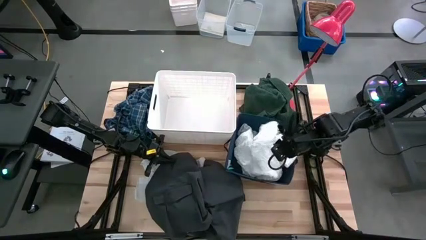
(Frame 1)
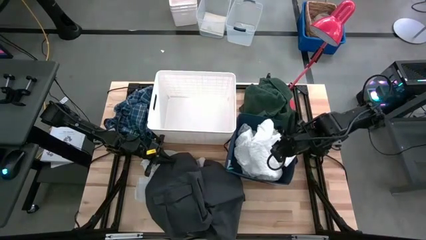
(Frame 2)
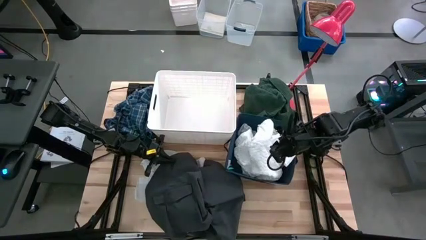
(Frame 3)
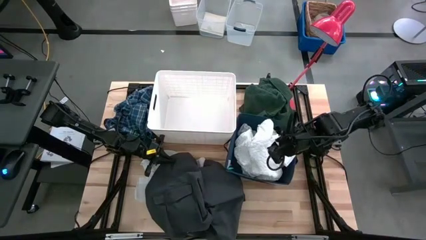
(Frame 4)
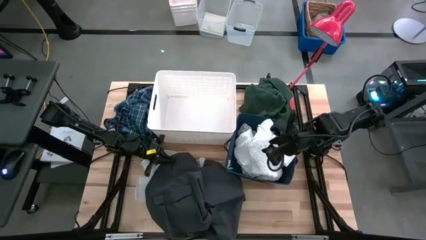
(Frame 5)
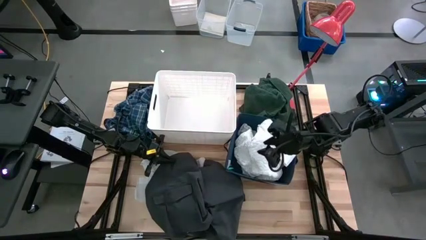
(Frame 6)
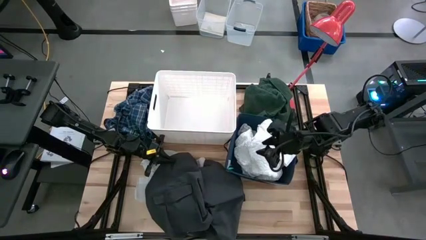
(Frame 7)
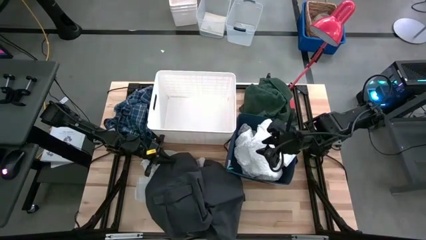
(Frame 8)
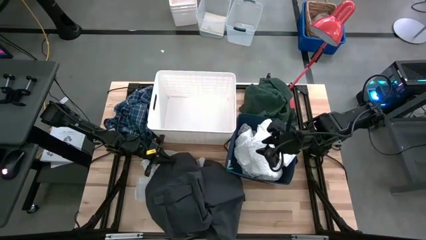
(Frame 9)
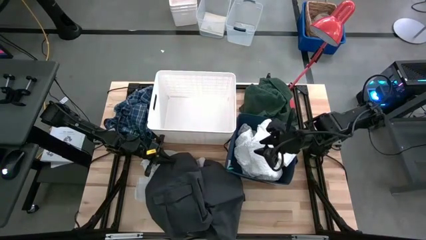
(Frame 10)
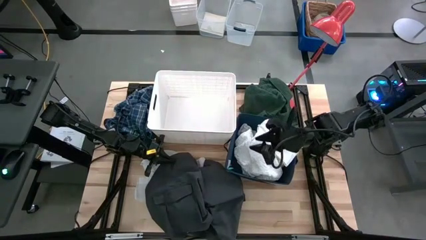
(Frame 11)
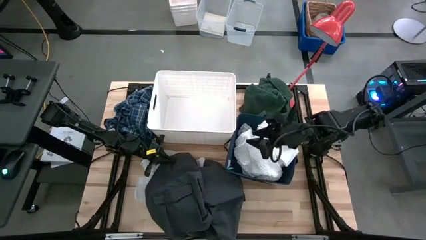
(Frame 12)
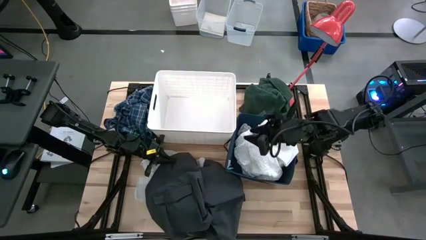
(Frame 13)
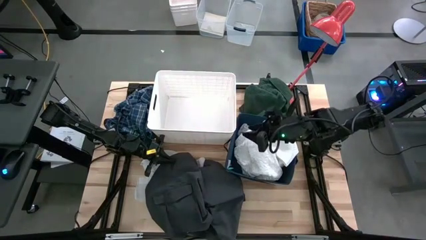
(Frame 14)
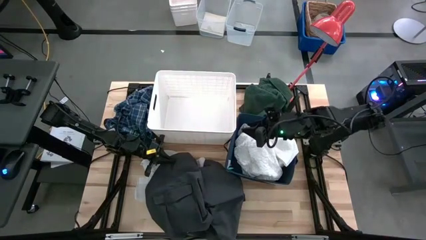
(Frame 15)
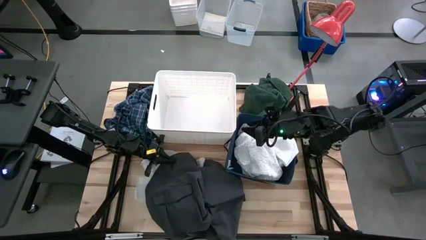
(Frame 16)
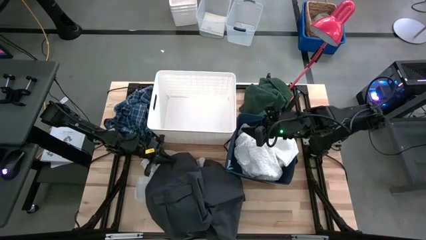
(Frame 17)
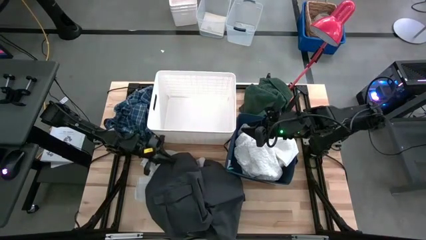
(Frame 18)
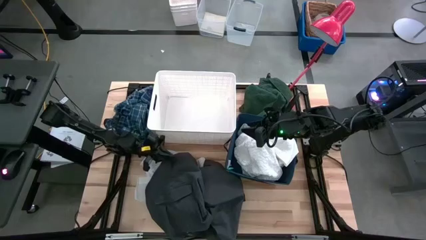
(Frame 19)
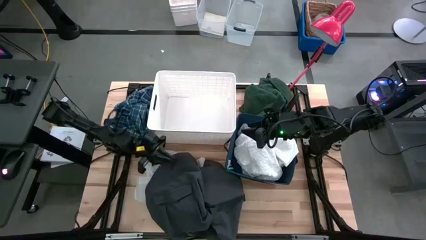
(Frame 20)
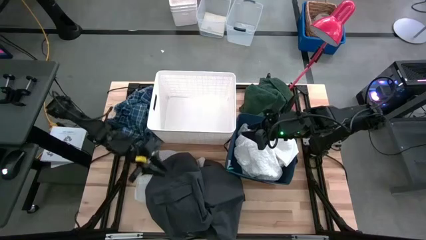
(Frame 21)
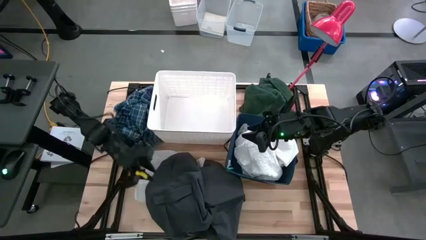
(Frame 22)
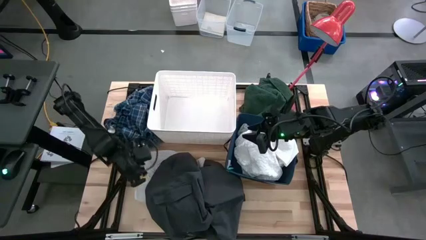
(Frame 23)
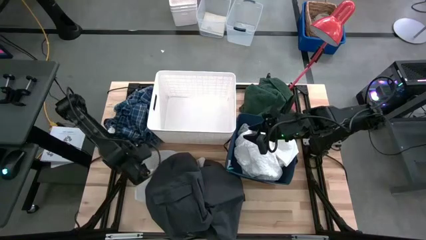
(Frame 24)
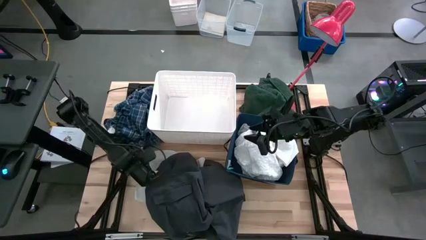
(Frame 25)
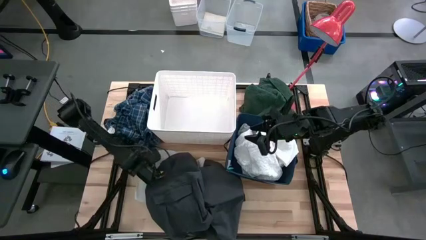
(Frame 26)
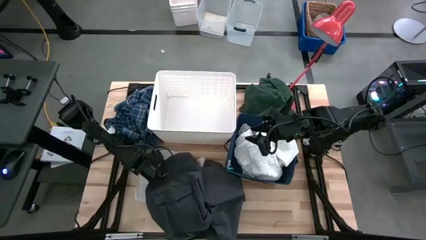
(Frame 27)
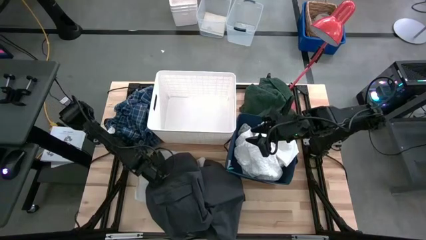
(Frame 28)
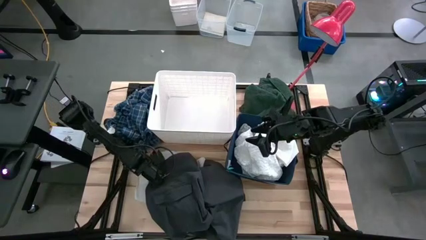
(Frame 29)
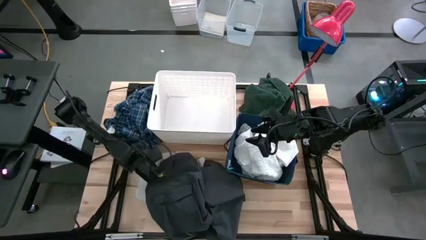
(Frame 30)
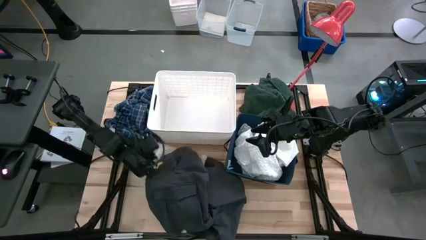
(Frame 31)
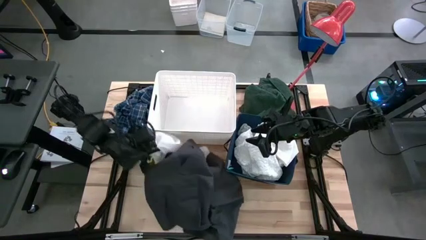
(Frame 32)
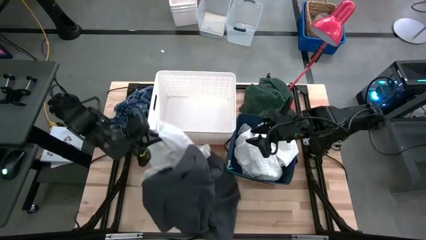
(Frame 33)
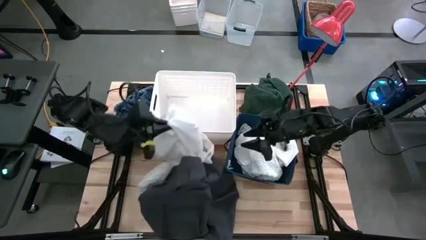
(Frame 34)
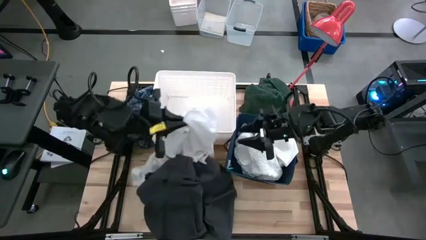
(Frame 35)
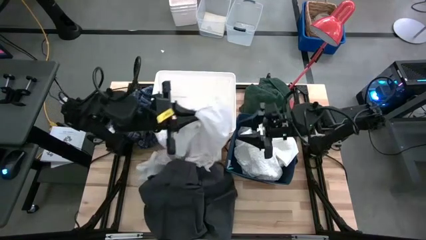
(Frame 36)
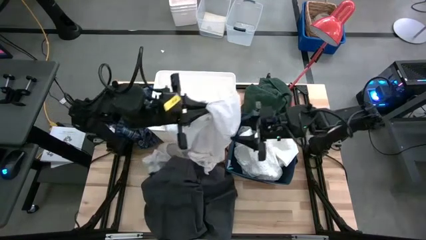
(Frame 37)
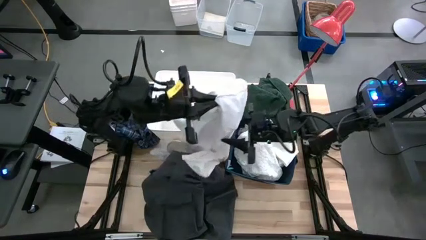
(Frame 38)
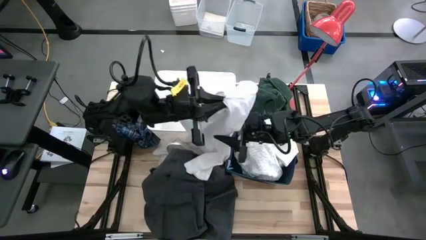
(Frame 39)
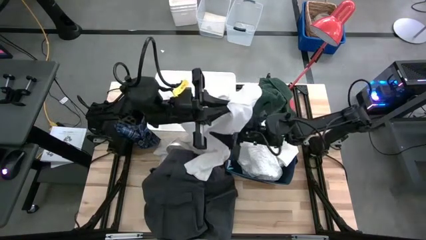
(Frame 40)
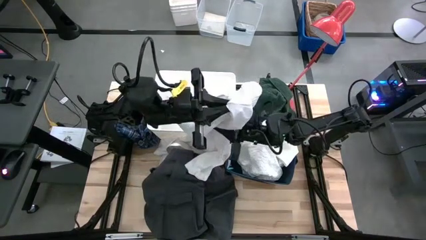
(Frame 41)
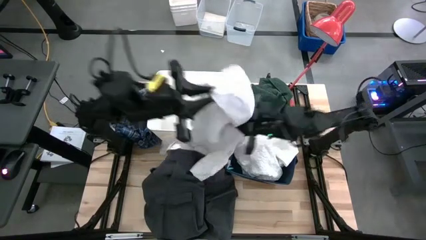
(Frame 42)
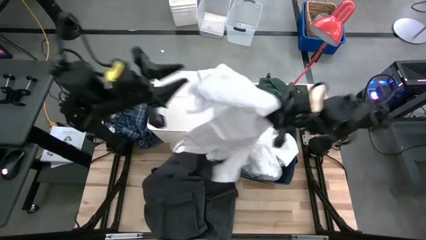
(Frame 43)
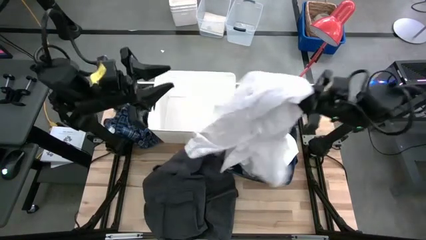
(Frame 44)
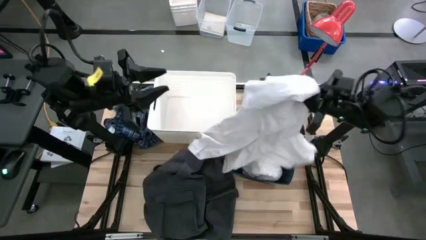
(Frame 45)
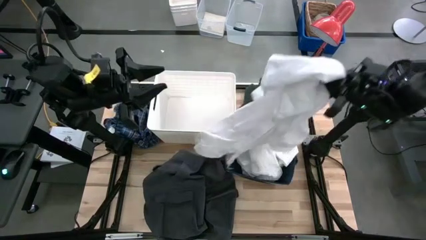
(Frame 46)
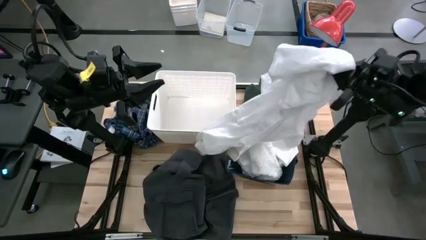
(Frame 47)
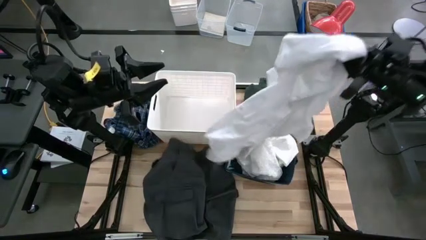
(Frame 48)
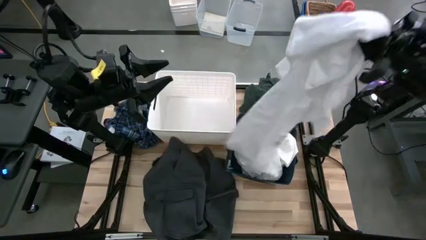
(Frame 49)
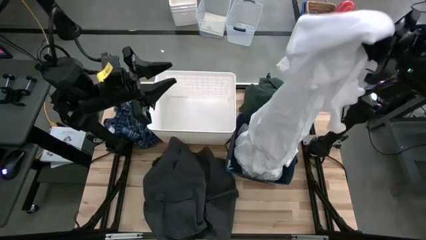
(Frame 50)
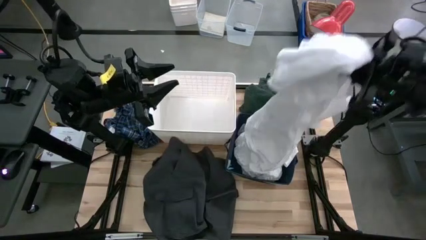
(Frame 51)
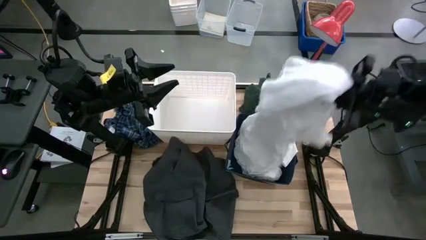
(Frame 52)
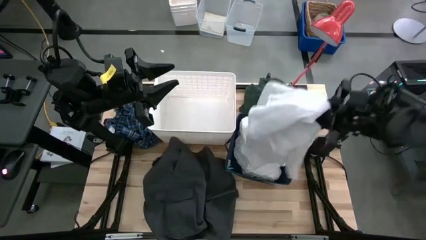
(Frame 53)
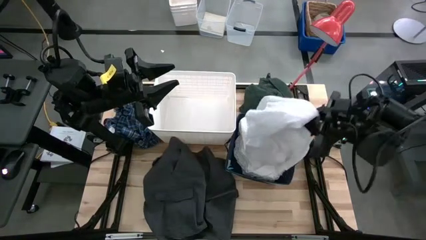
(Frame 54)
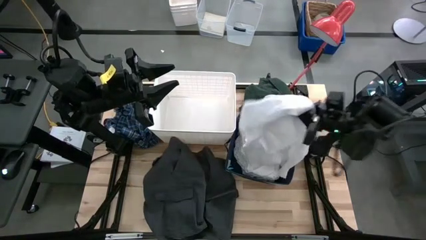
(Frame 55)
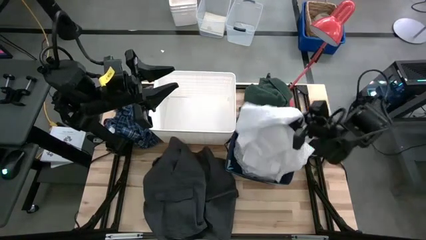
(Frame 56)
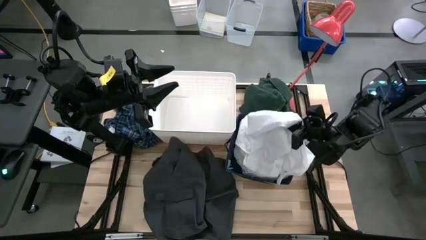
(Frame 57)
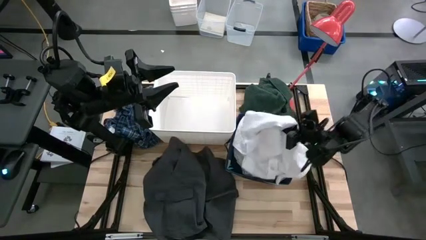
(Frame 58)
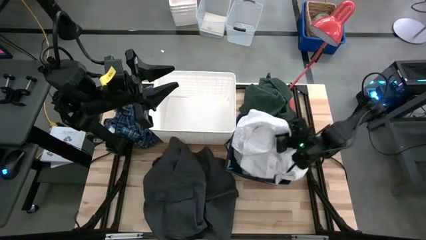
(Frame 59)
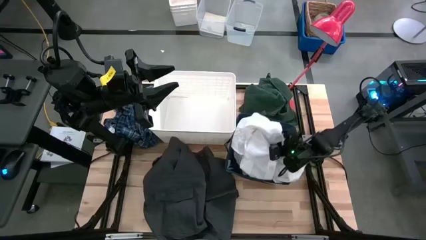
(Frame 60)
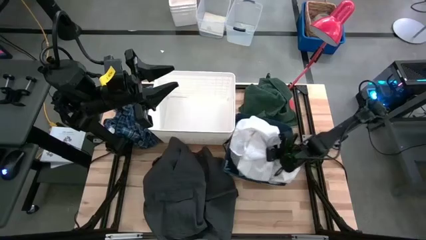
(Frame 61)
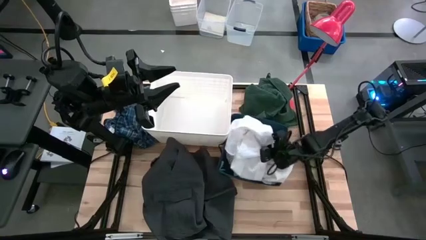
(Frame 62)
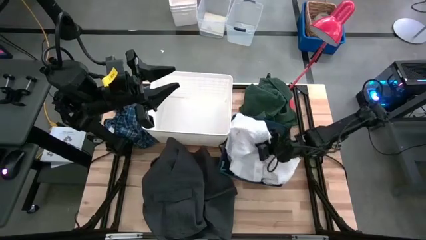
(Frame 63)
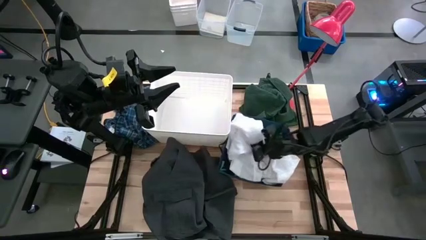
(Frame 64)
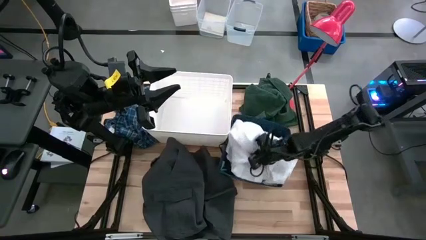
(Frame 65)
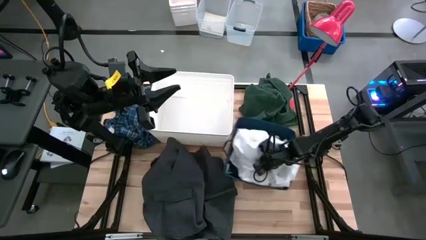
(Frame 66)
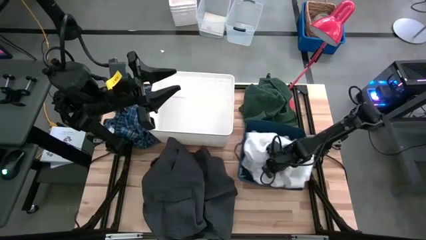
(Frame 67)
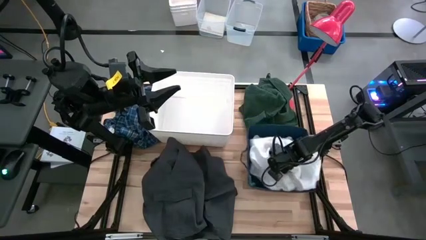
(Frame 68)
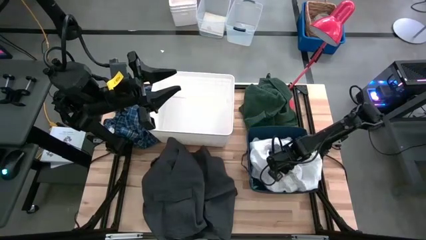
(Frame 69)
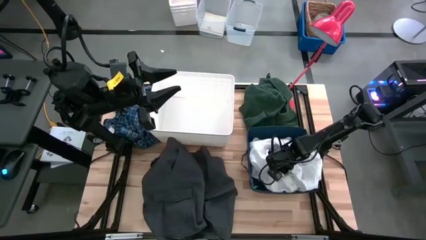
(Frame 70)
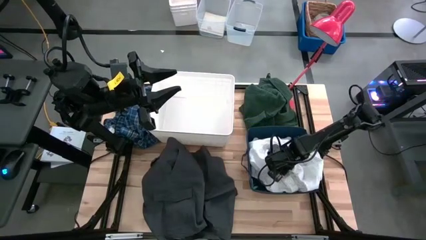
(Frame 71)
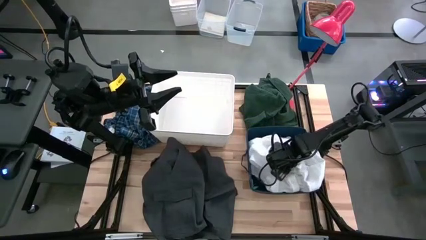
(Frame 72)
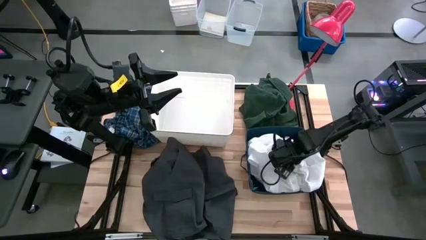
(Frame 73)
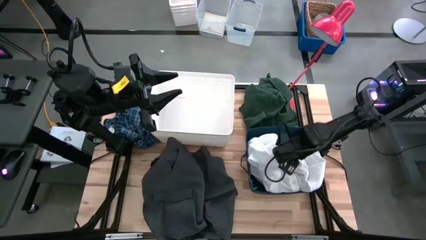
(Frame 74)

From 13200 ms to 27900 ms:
Task: Sort clothes
Put the white shirt into the blue bin
